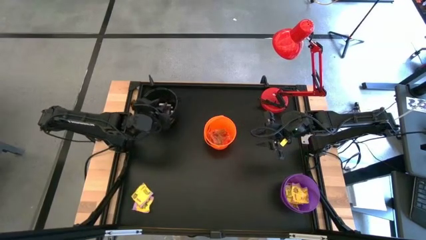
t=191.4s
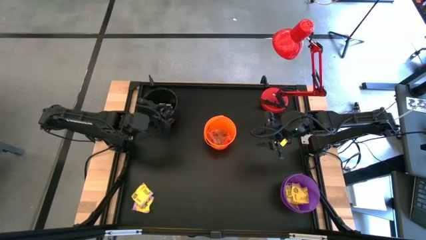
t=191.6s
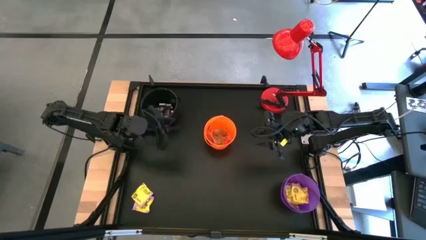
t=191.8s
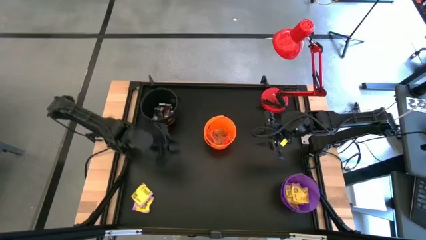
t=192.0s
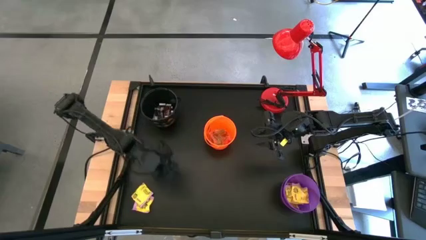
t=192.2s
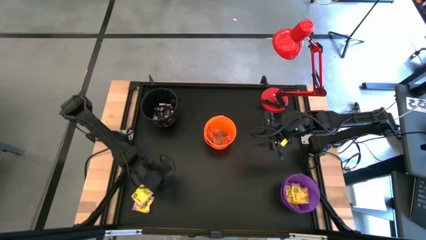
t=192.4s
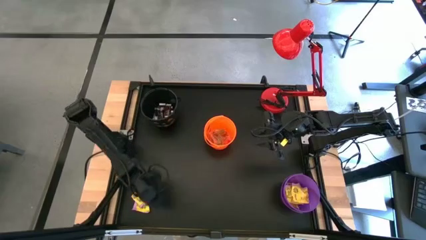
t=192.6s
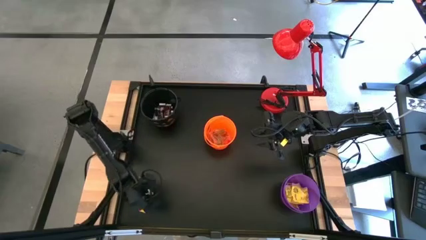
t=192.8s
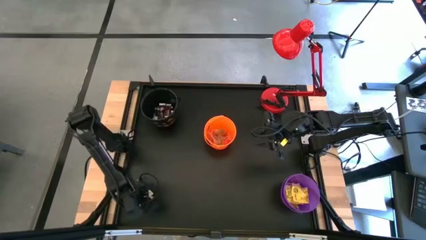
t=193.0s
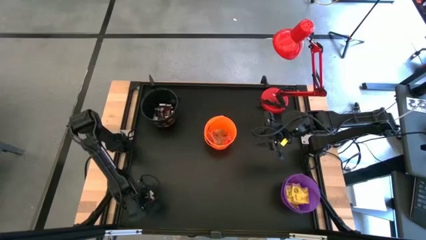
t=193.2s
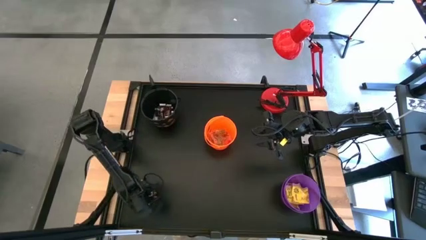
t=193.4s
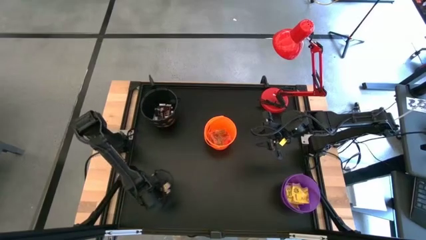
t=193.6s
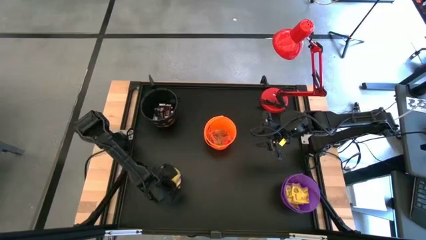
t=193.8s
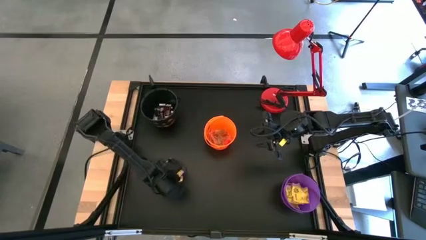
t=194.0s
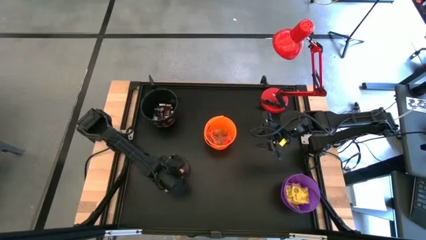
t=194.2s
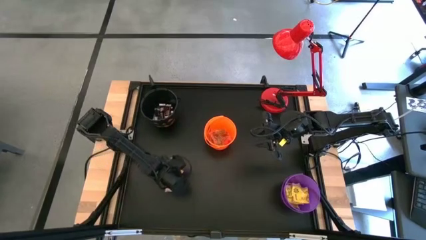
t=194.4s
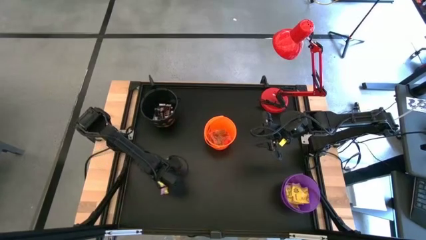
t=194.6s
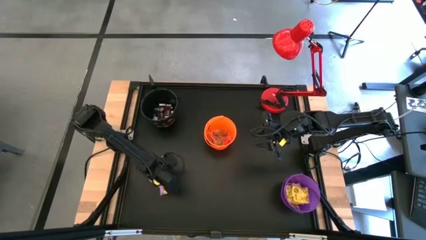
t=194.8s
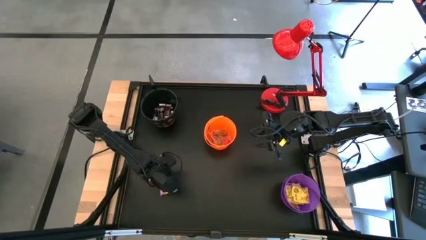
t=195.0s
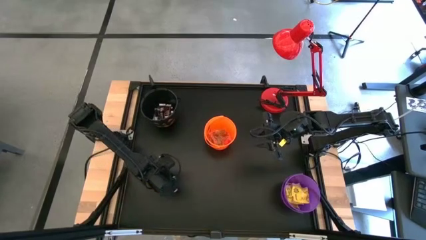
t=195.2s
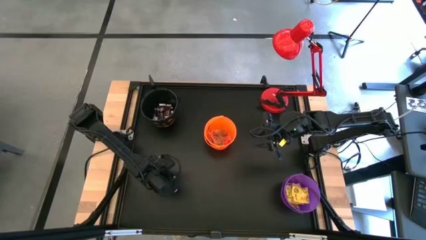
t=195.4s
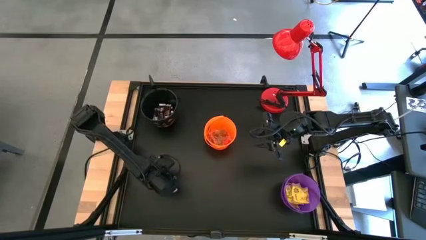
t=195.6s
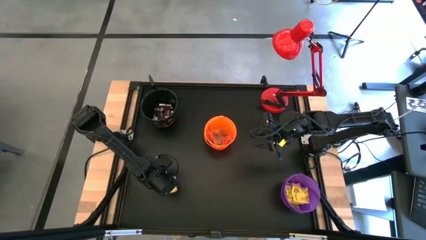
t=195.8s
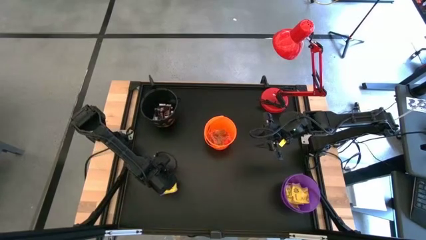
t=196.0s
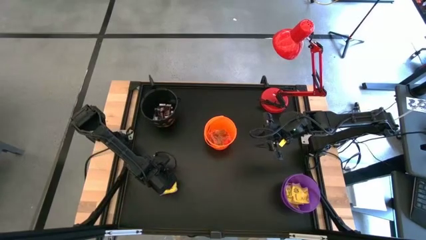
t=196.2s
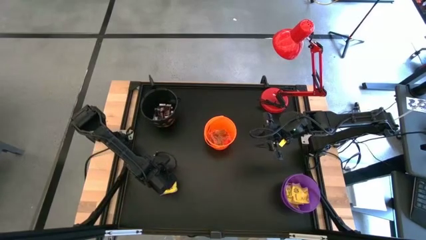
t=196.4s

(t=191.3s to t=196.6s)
Task: Sort candy
Put the yellow candy into the purple bucket

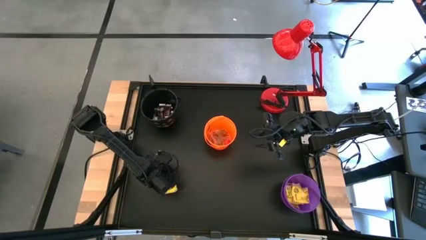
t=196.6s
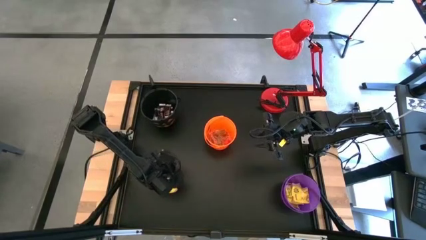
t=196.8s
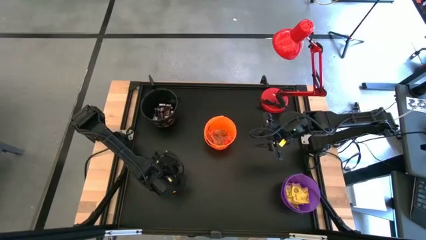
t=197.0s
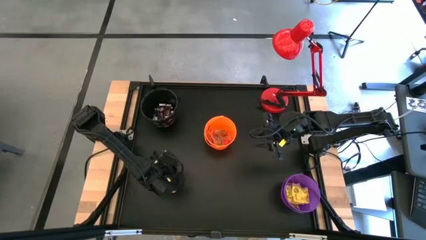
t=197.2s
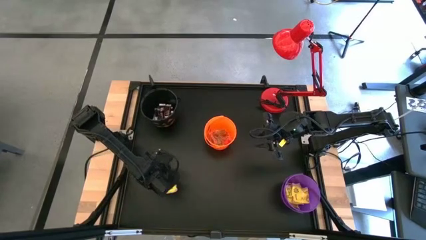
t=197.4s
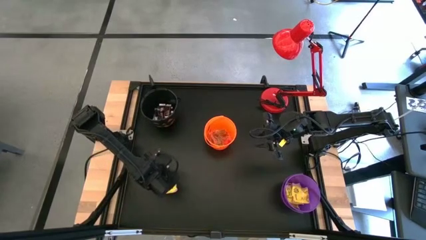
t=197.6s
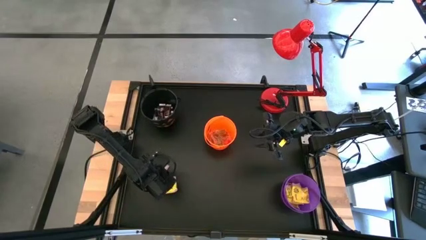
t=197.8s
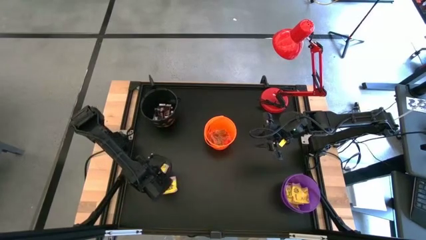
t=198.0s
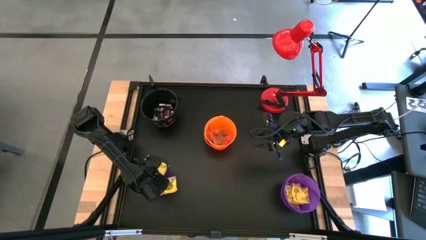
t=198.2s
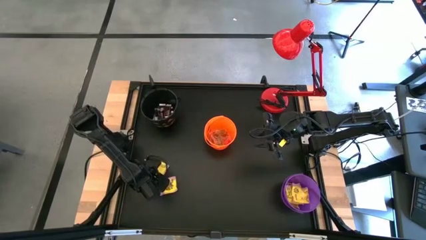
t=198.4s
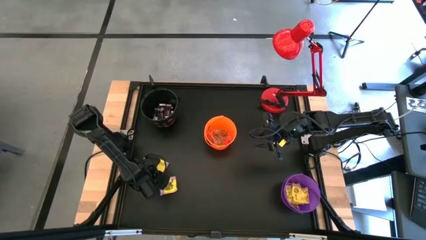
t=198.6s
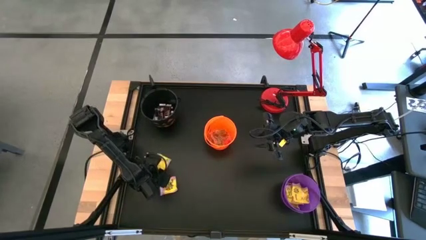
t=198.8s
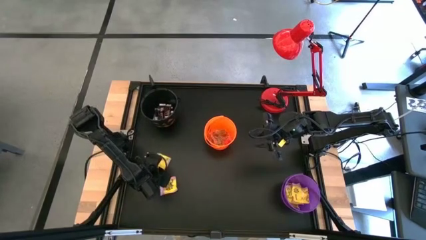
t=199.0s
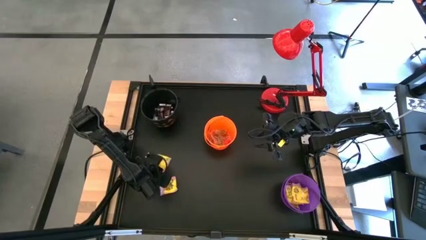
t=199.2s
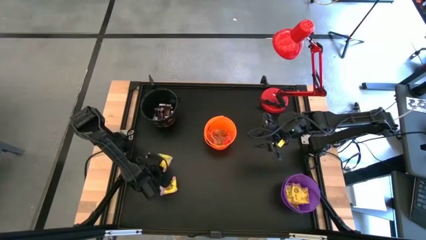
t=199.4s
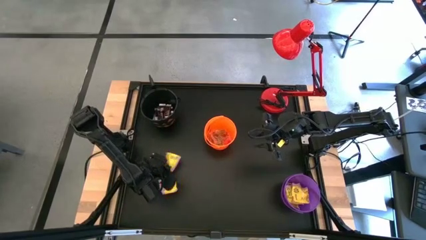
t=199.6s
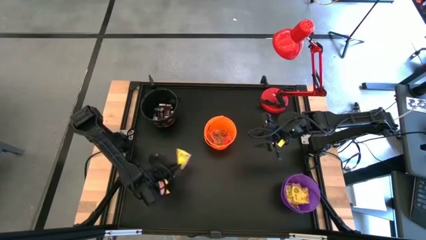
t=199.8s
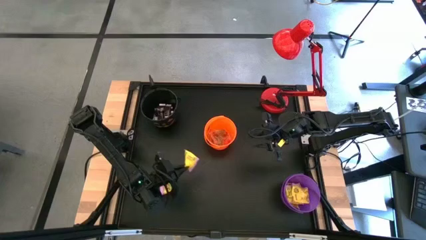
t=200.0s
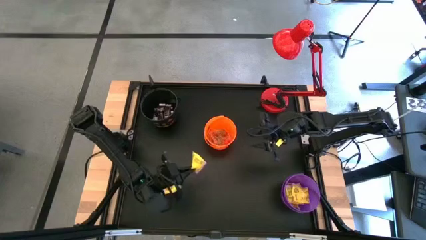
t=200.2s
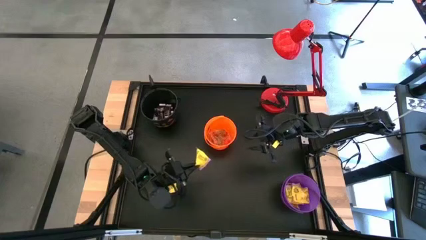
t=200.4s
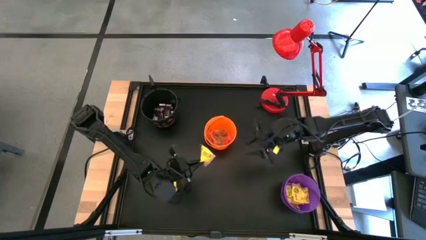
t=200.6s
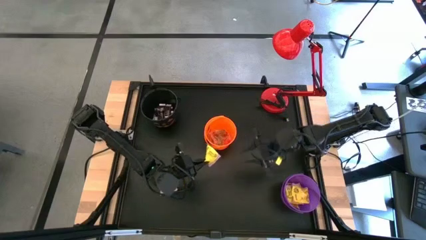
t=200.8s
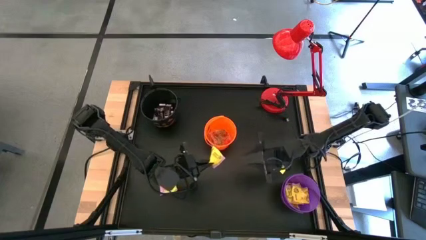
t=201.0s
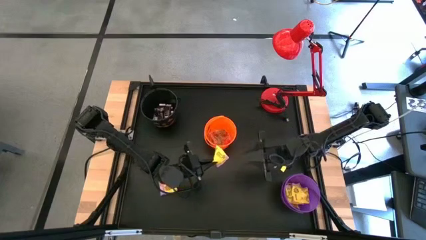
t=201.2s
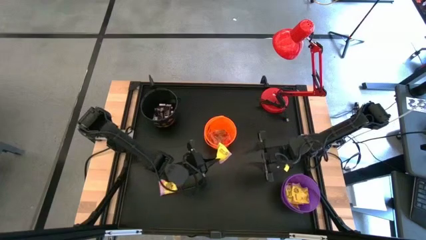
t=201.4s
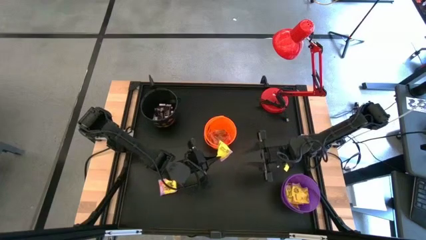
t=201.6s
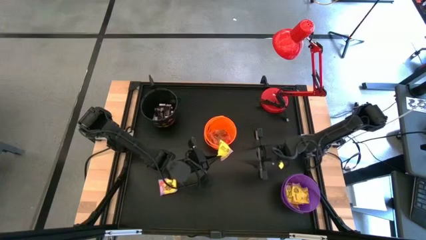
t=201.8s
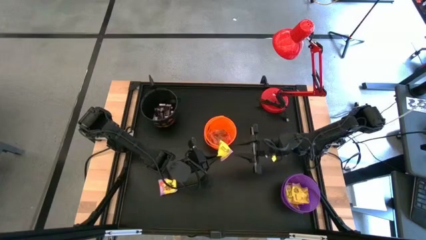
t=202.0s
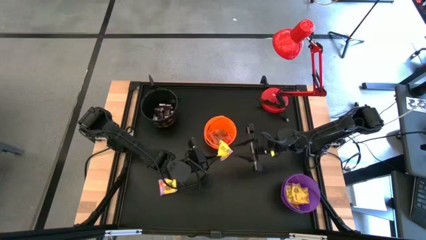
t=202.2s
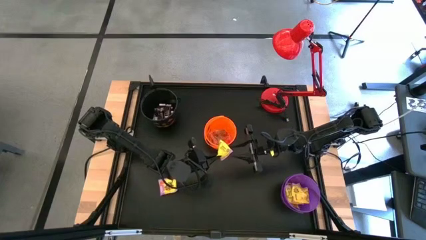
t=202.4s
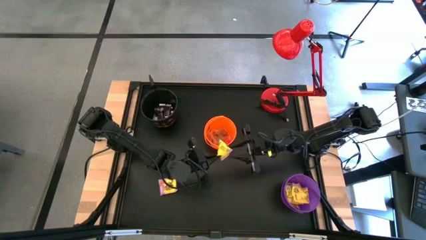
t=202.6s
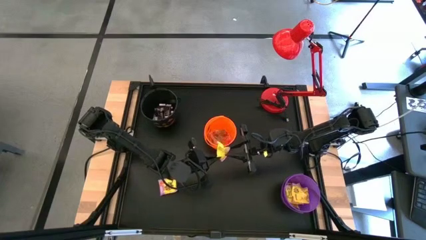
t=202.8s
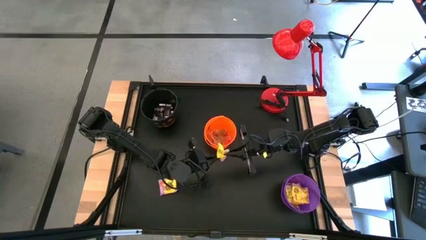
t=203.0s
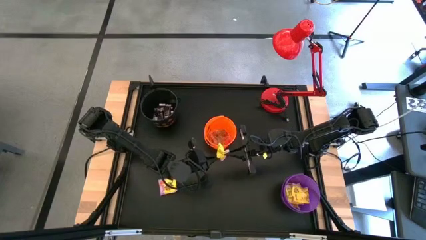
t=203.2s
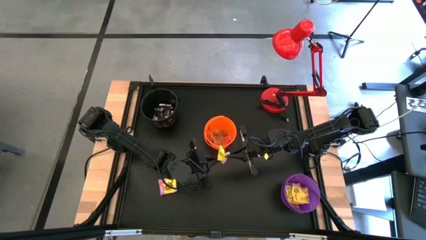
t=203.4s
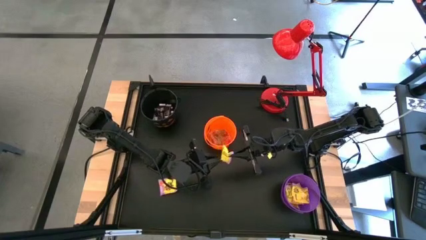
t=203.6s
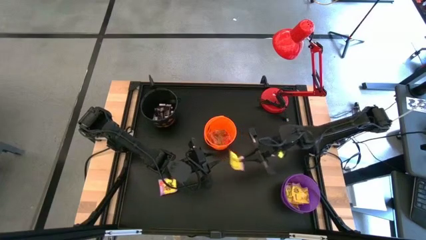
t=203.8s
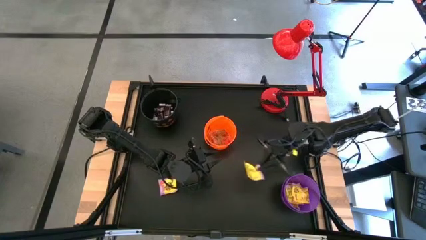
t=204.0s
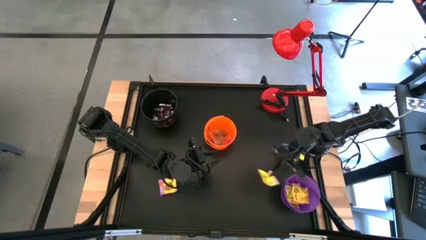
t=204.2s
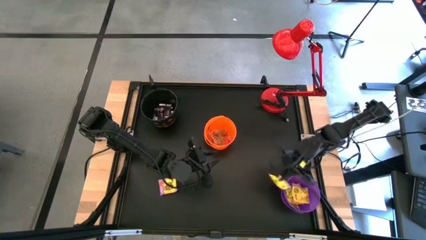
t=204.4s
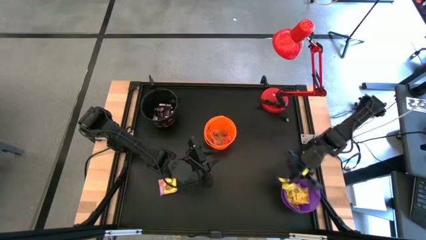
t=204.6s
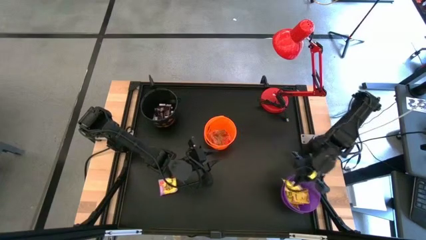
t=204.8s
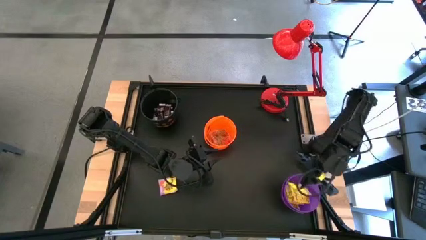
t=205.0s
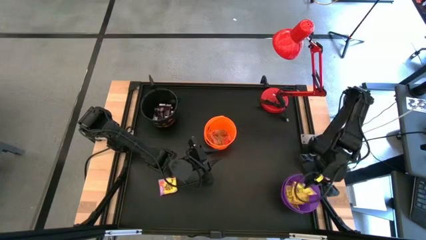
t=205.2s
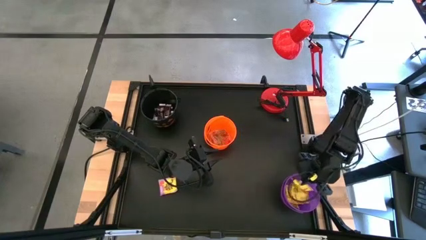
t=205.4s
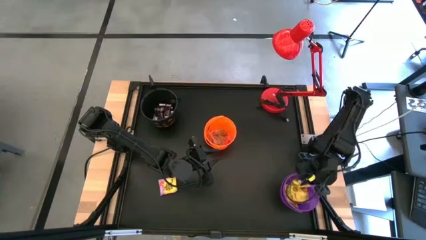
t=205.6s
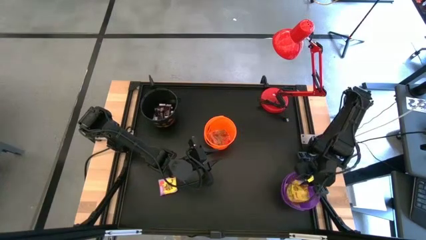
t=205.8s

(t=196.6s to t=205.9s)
Put the yellow candy into the purple bucket

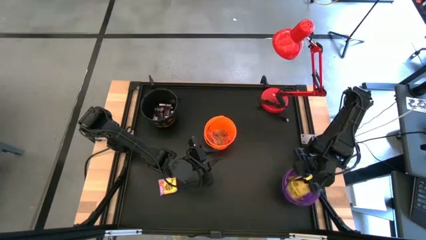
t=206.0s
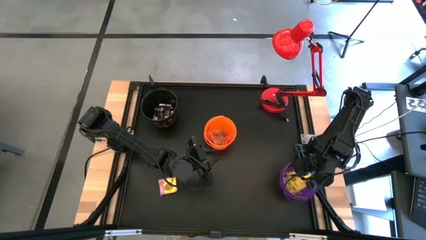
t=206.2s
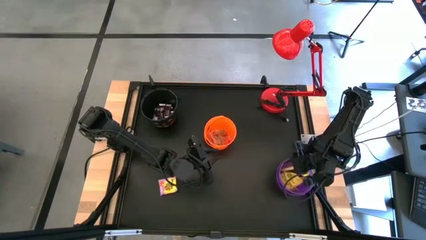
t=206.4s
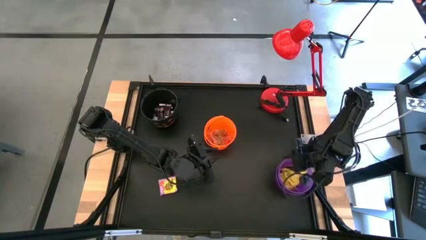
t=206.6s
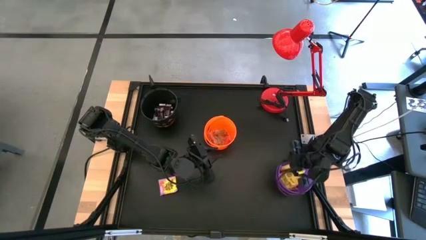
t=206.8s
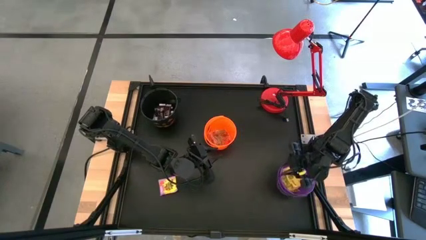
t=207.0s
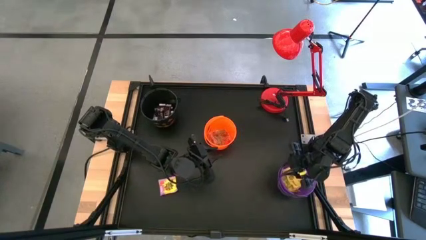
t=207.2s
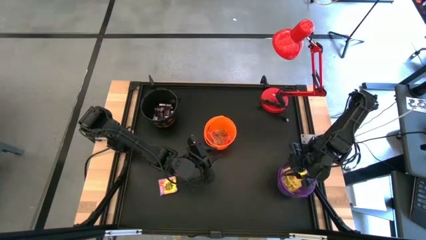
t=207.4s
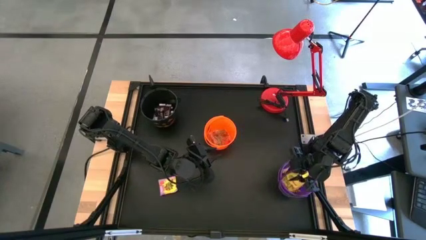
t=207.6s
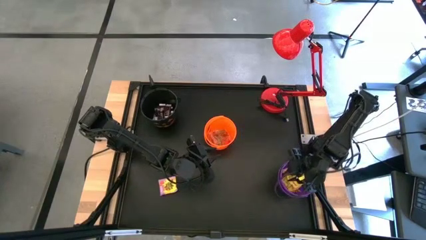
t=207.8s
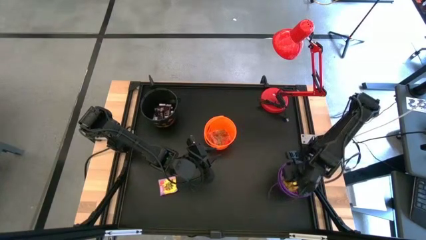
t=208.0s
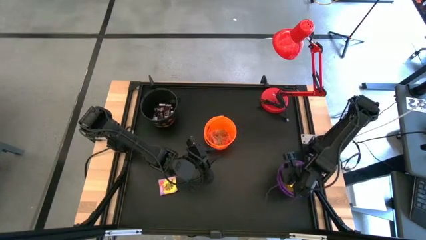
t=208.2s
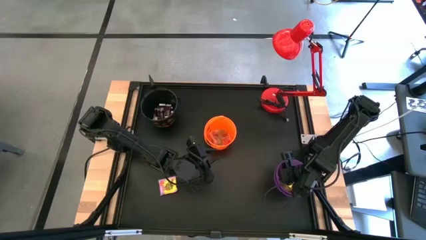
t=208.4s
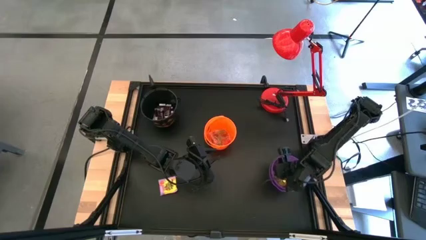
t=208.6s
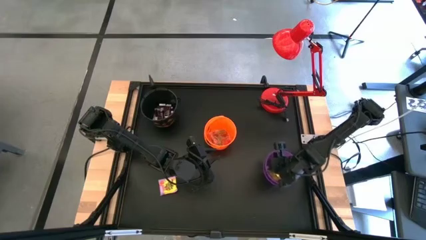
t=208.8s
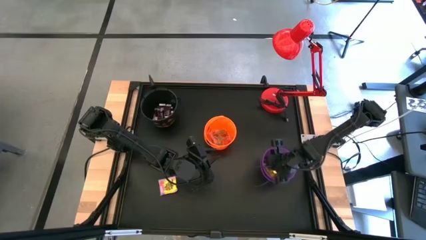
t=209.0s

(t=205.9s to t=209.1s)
Adjust the purple bucket
